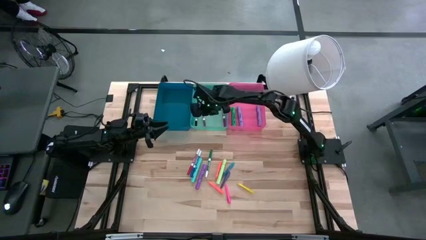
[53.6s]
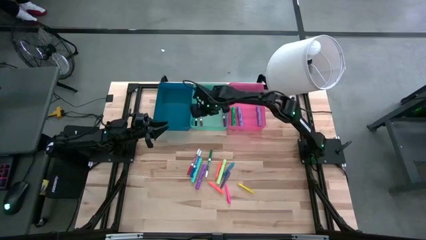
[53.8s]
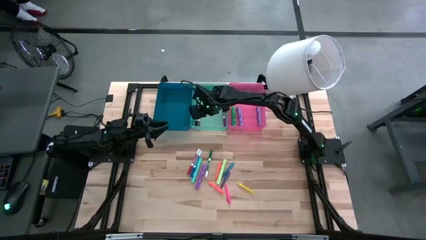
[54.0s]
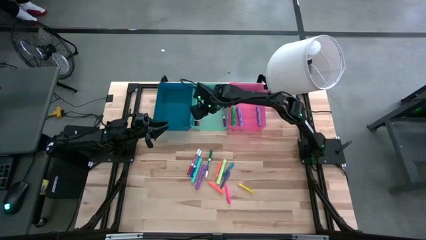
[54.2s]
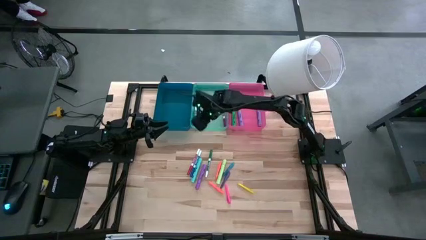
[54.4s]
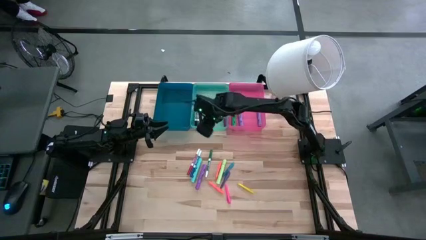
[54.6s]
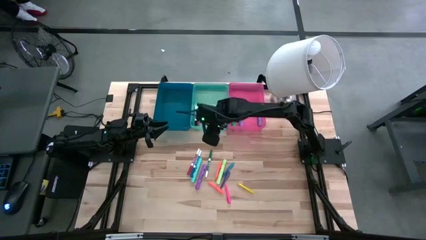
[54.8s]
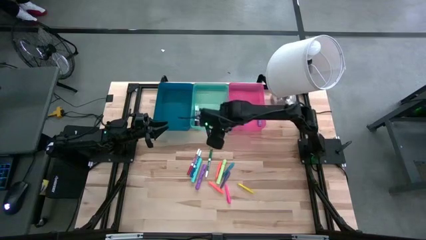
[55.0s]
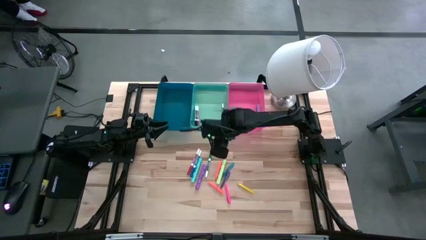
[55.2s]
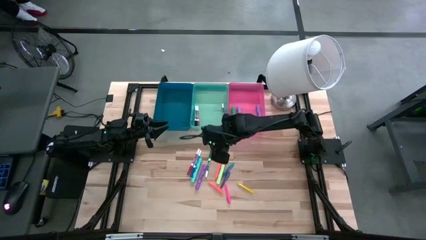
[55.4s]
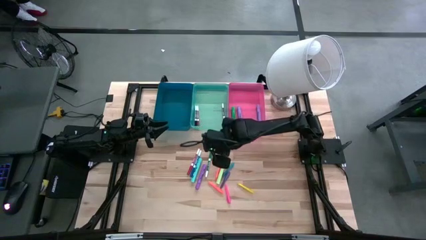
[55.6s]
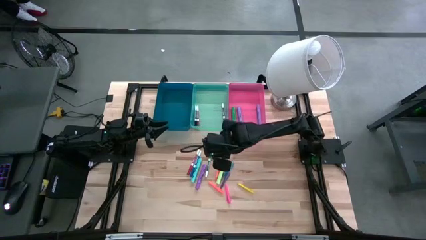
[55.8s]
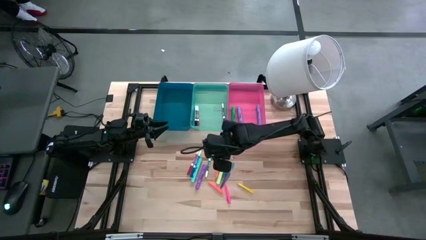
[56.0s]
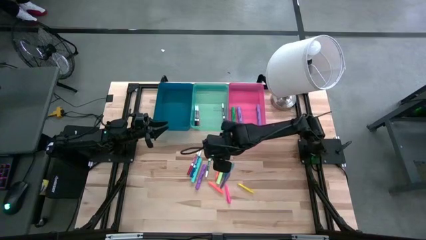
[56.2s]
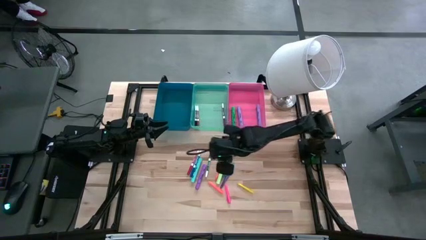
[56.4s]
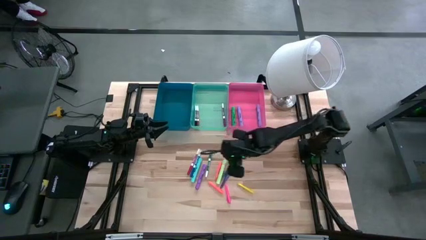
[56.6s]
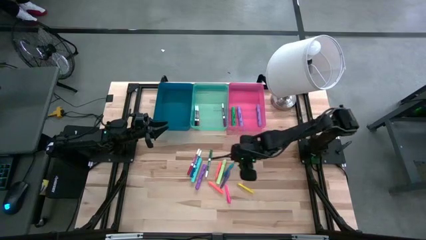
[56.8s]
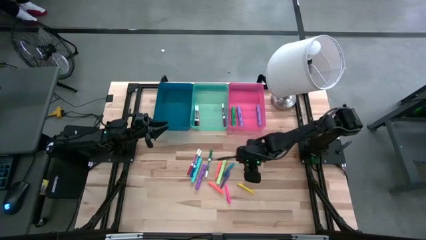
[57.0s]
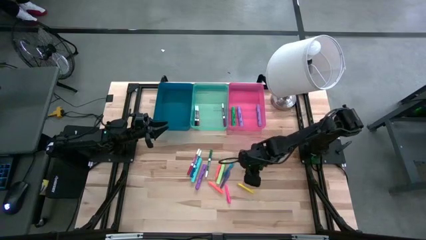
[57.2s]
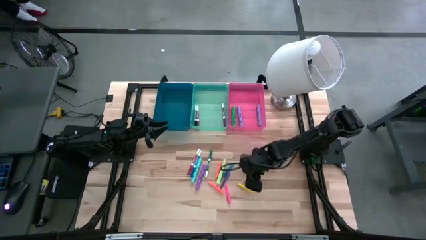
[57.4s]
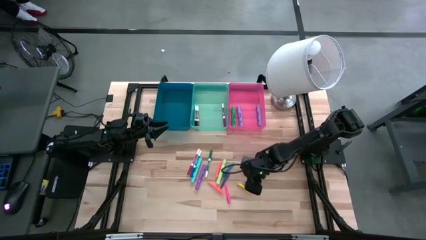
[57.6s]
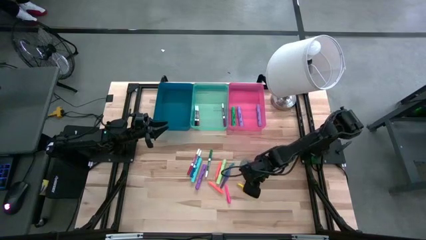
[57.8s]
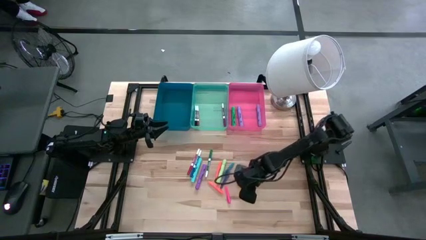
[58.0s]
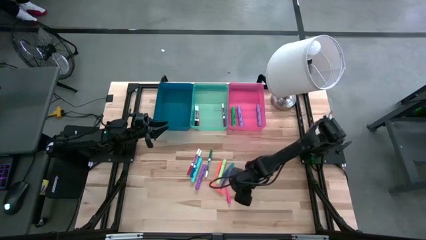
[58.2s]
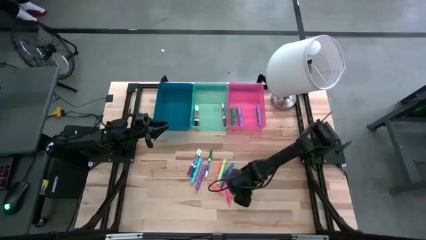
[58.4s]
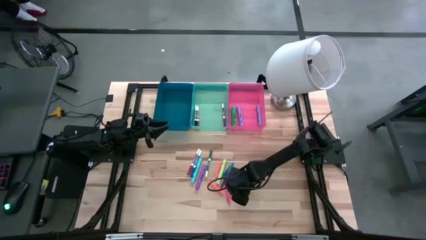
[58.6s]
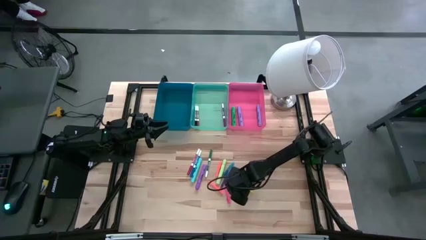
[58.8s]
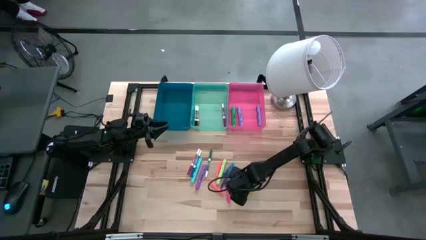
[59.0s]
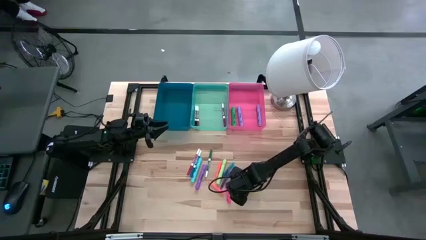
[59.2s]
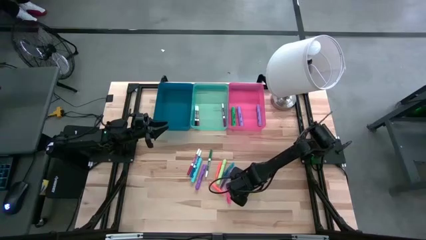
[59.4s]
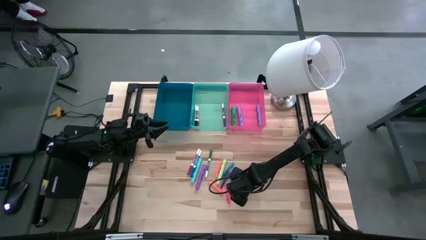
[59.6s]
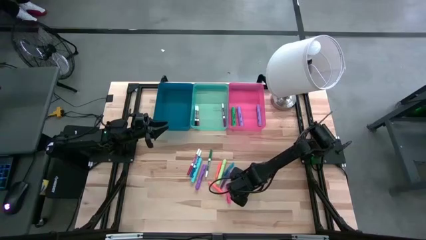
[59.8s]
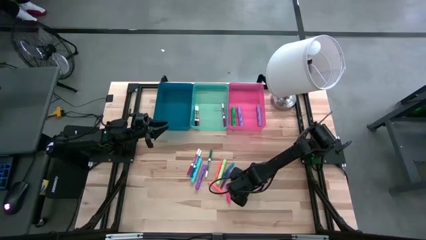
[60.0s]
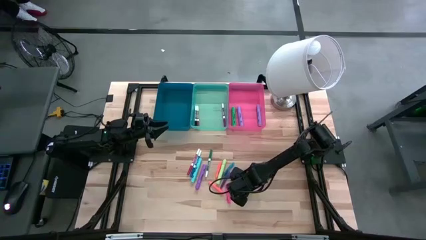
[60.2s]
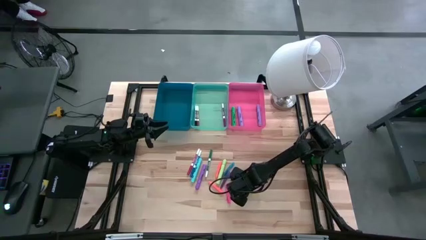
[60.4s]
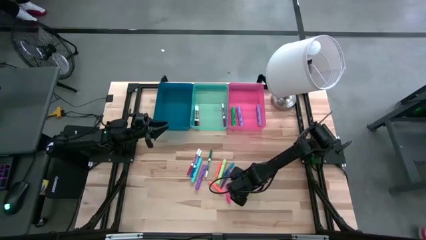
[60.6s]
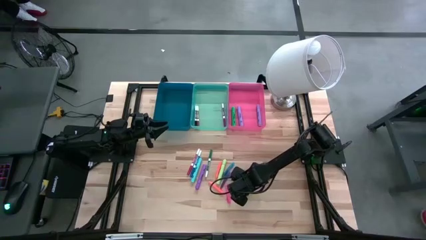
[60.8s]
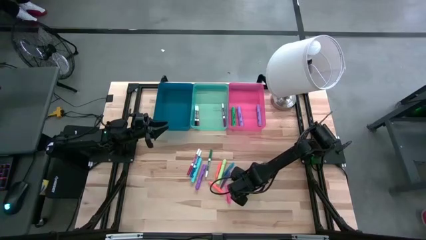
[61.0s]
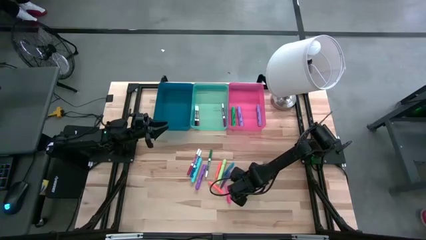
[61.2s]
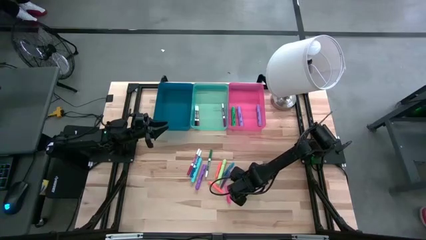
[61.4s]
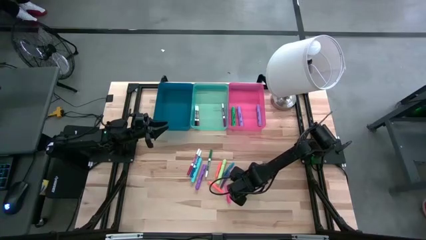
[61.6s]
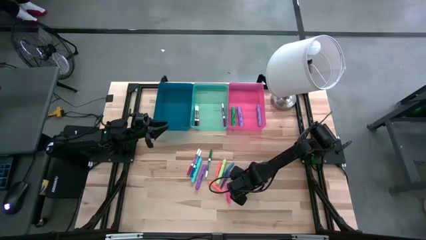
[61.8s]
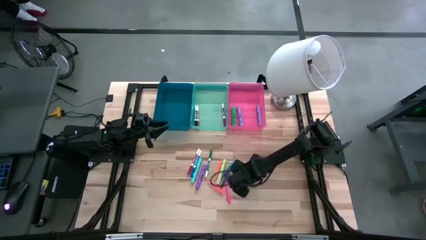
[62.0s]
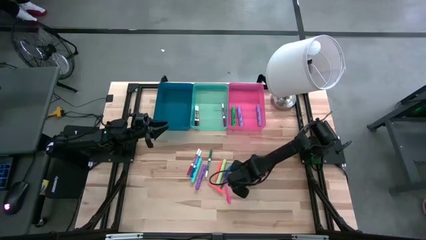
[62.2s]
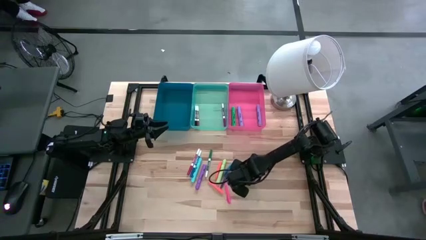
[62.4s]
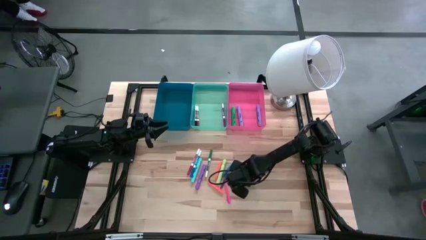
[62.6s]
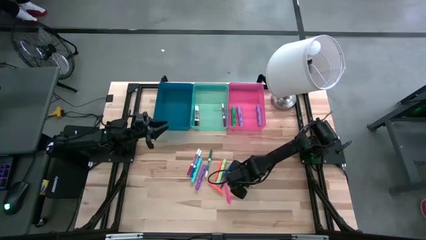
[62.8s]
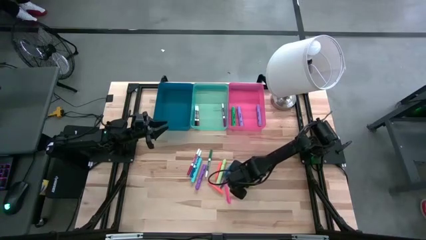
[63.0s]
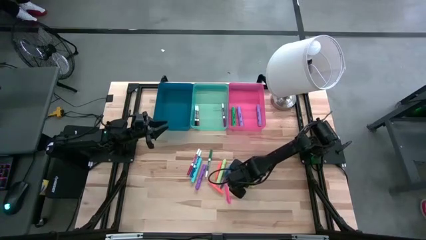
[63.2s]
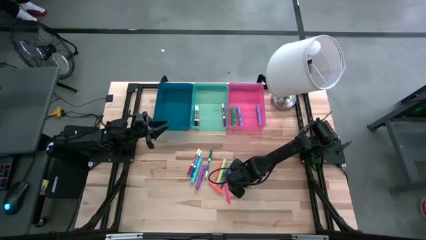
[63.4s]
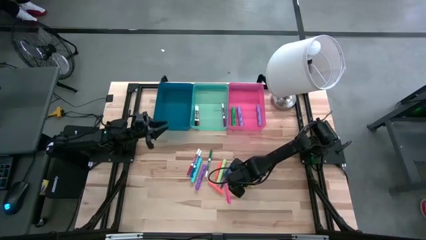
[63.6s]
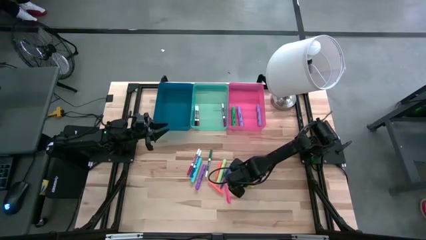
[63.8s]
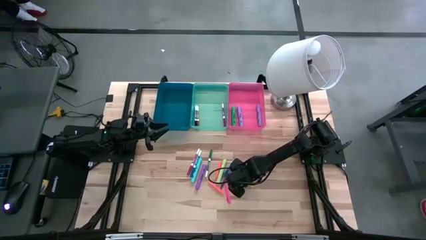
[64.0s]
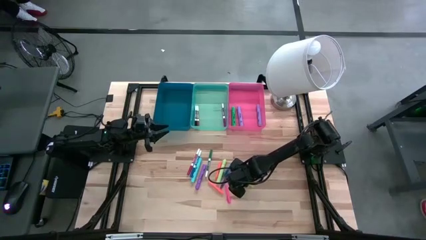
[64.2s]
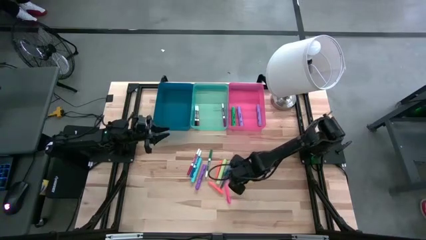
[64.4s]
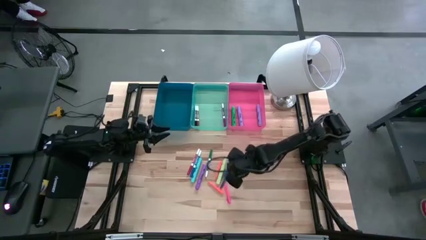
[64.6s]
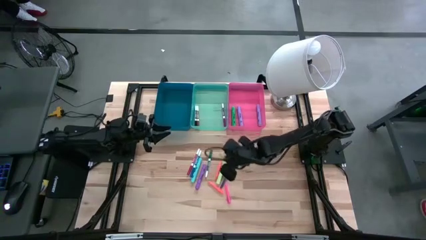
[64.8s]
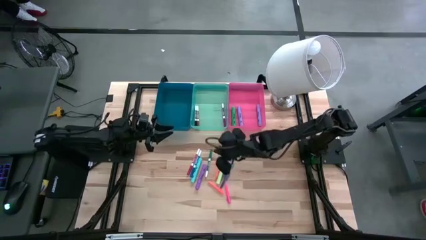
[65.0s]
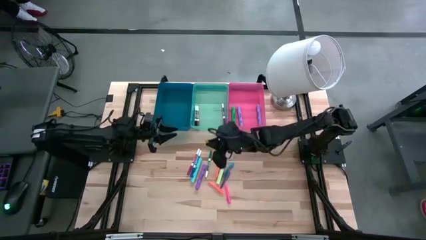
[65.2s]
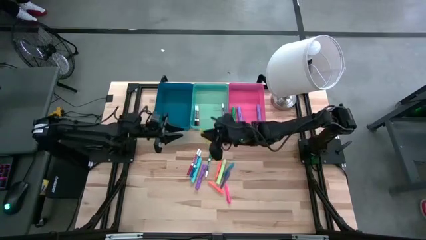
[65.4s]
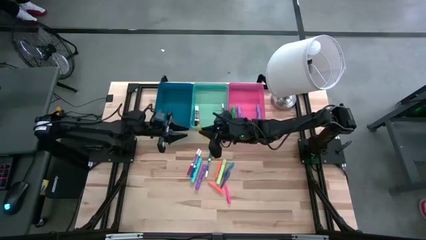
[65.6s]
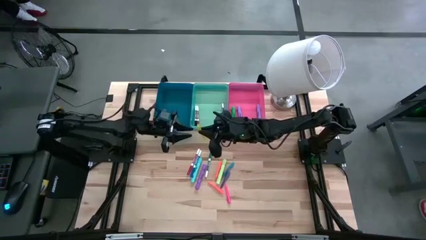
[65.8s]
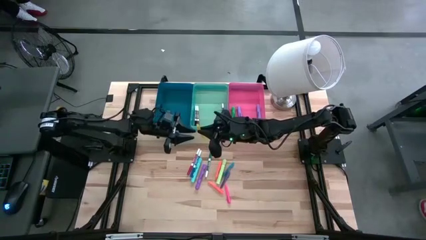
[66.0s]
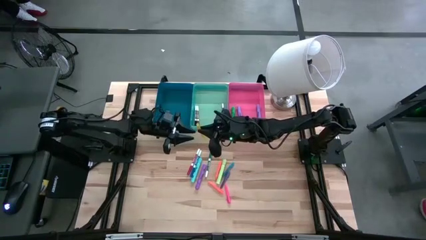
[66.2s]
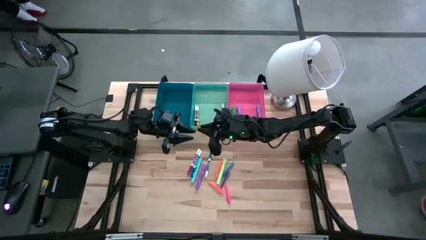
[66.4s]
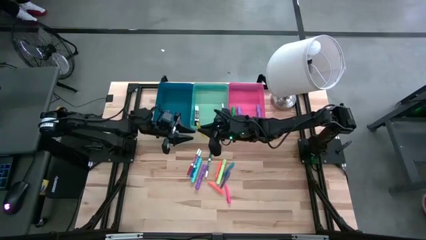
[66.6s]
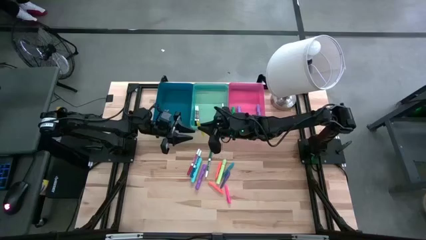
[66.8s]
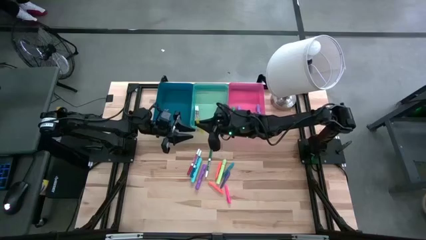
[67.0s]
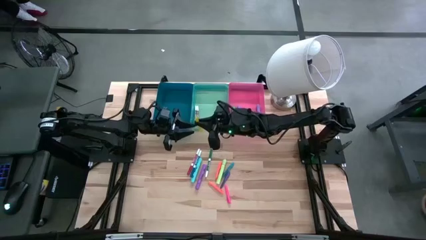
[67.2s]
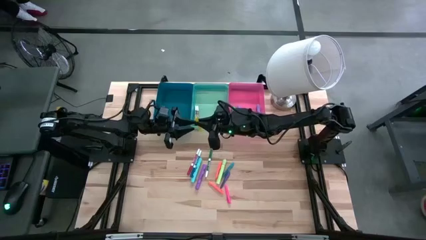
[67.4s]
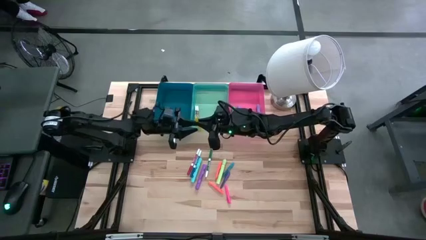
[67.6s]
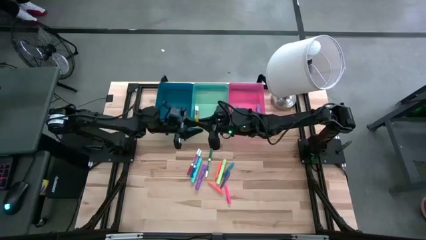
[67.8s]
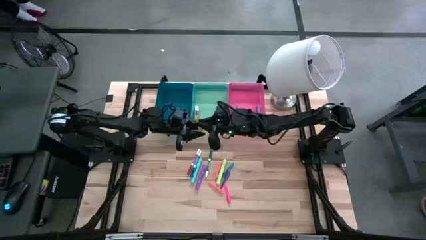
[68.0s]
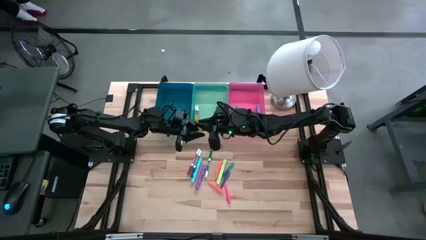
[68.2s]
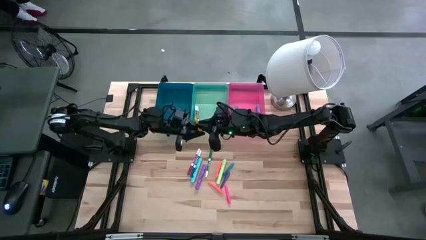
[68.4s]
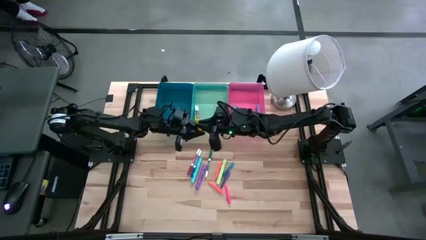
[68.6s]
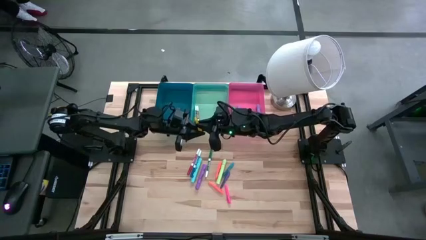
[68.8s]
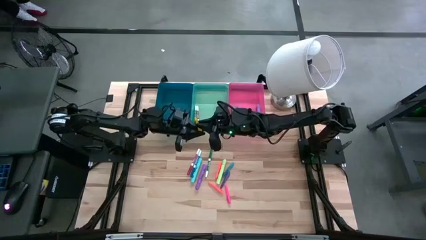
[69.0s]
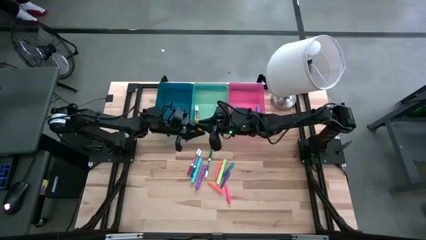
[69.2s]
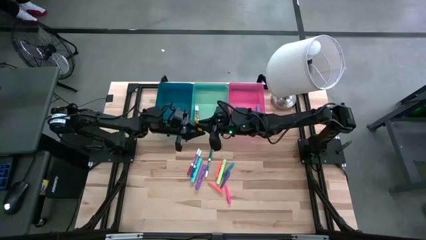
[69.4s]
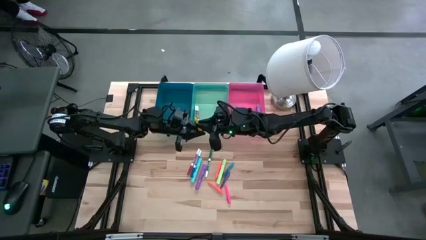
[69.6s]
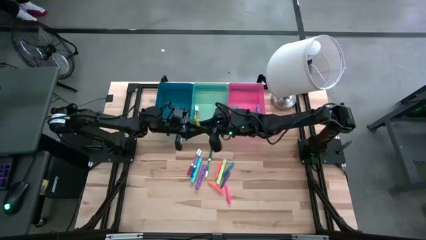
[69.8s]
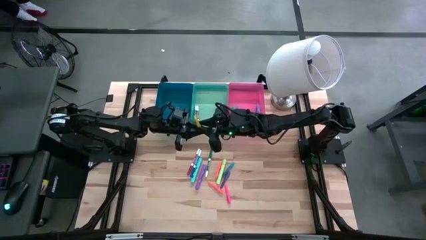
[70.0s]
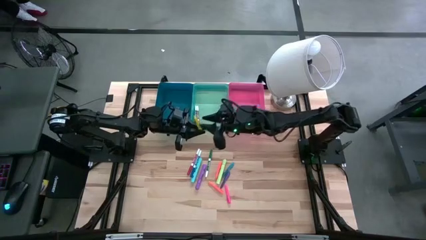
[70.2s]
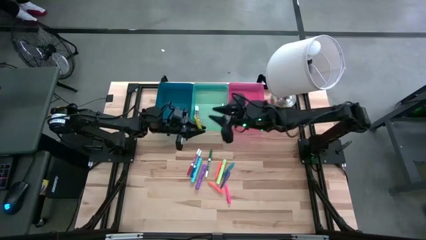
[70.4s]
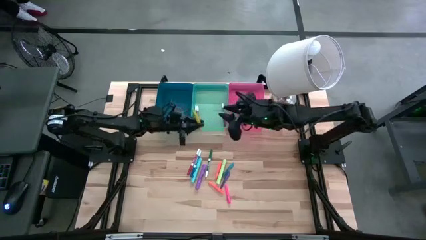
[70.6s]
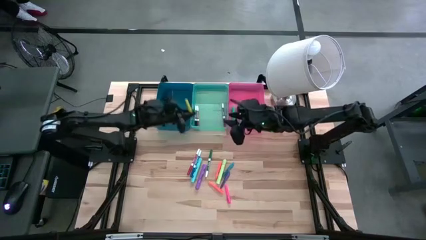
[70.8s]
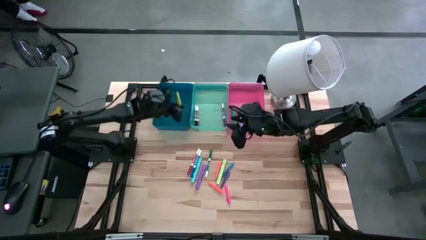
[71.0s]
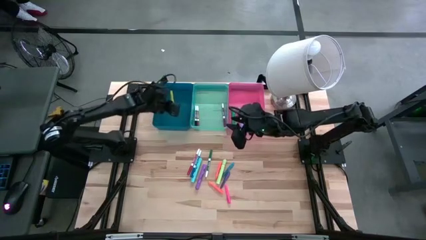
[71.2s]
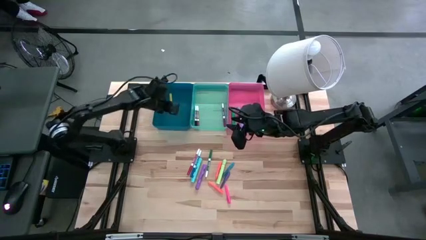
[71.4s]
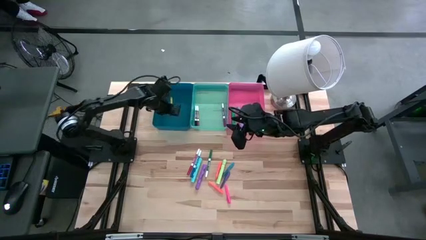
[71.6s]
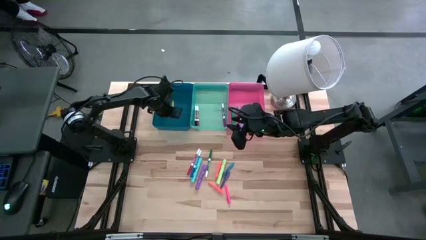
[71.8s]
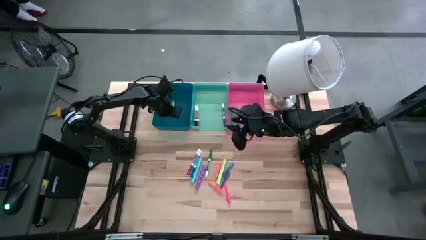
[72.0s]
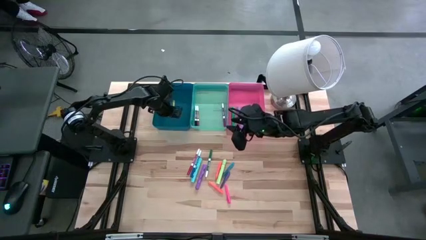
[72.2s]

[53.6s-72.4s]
Task: Pick & Place Markers
Put the yellow pen into the blue bin
